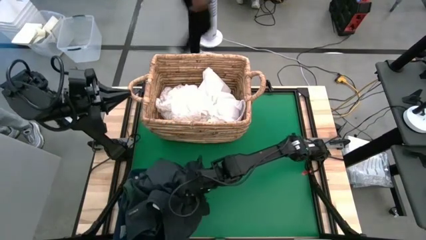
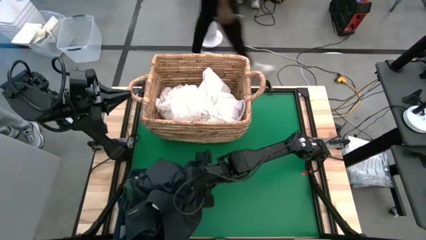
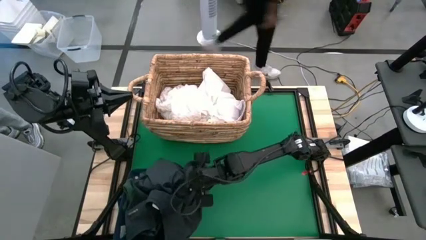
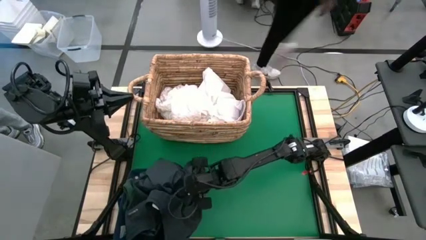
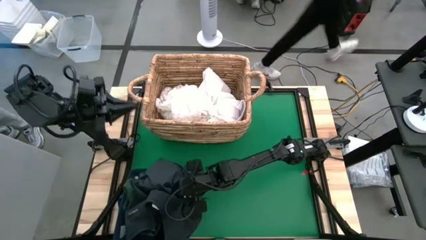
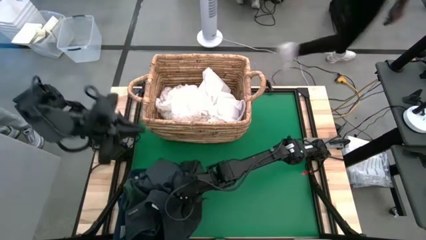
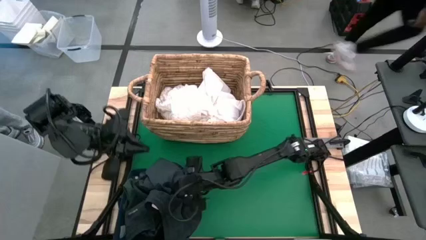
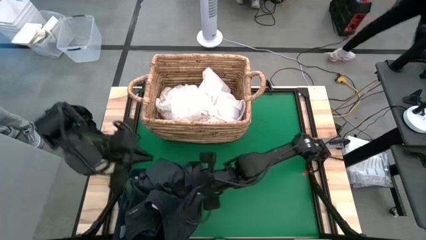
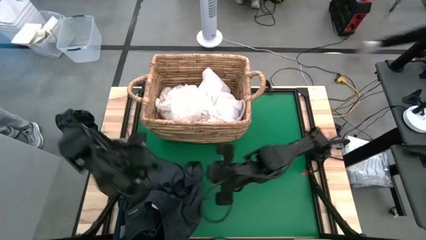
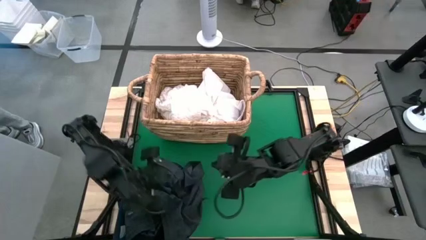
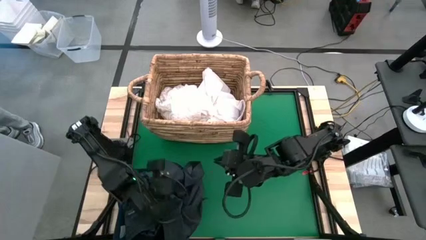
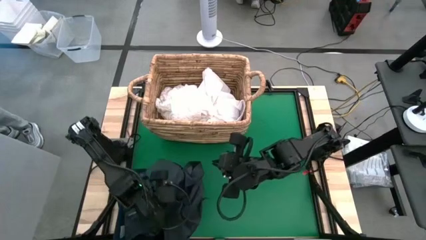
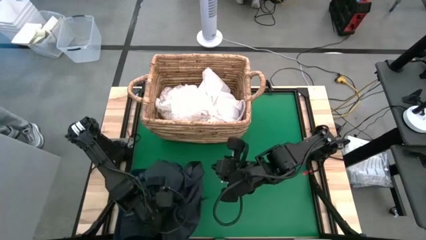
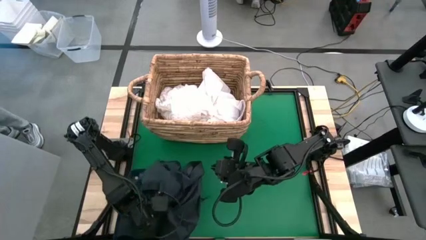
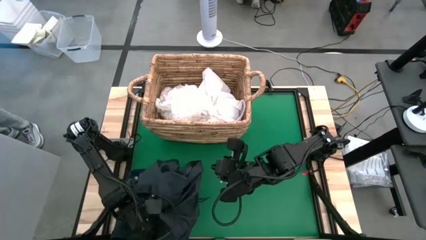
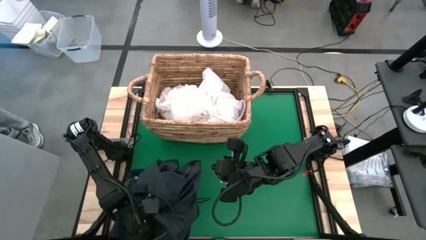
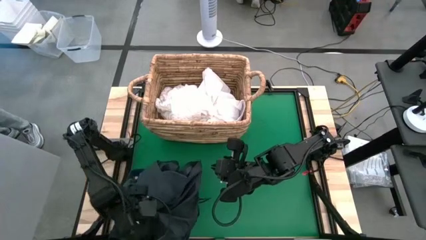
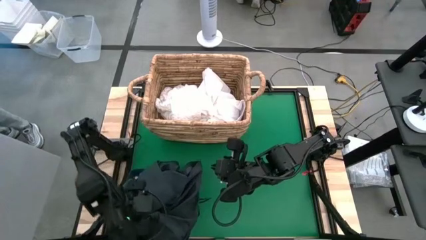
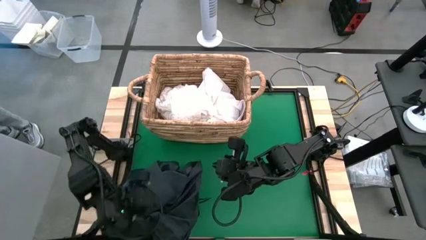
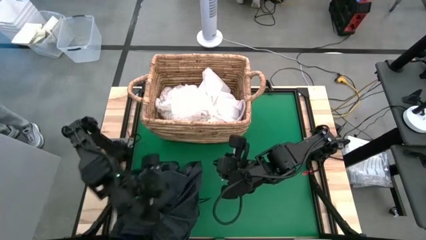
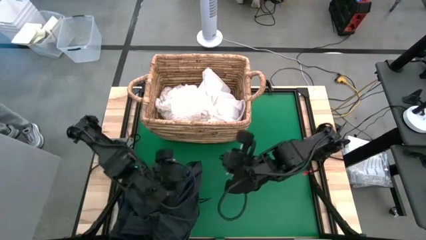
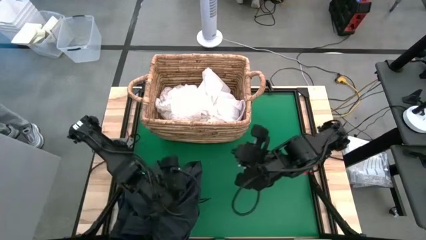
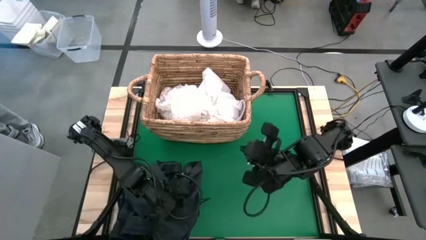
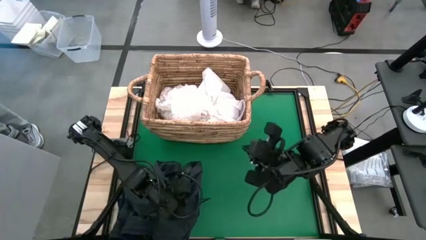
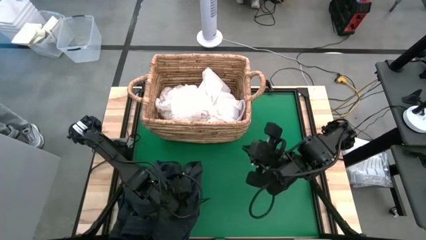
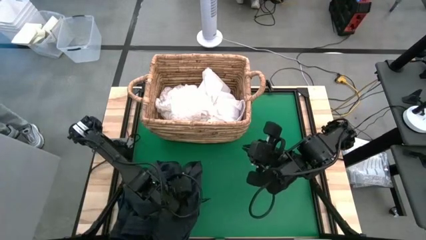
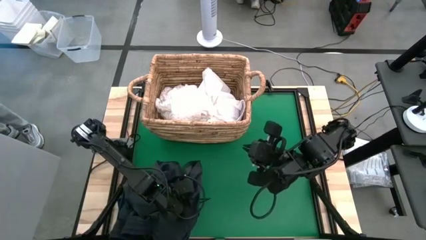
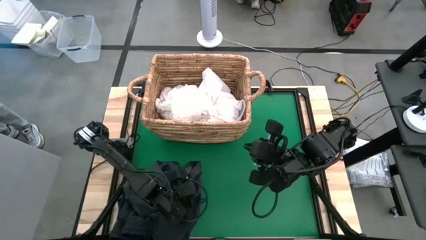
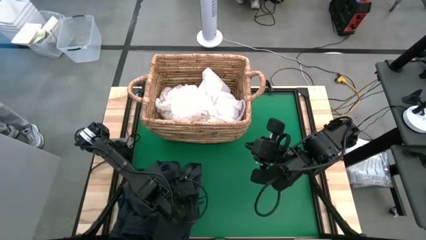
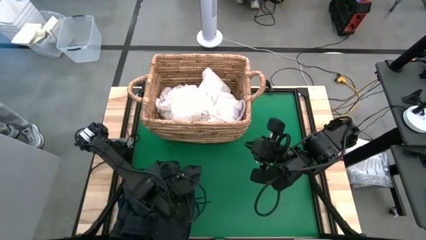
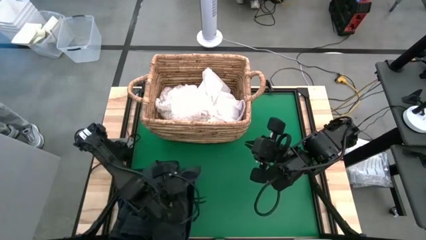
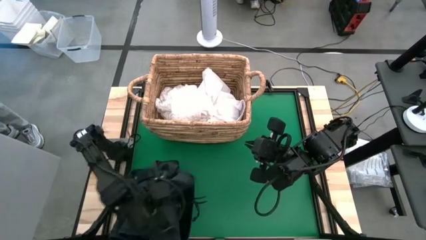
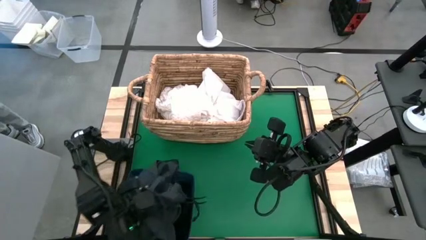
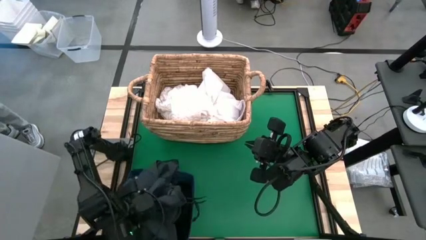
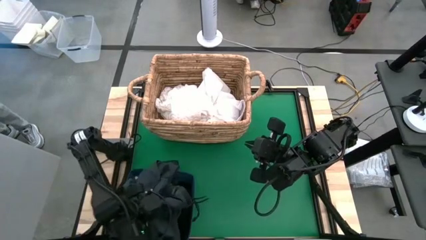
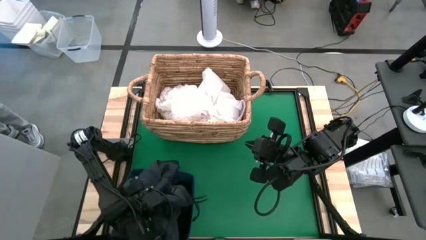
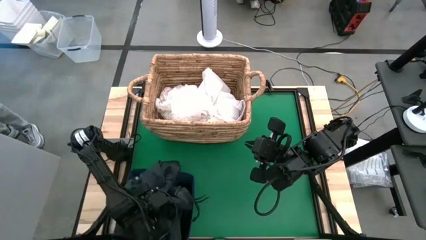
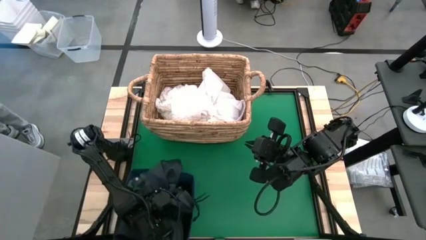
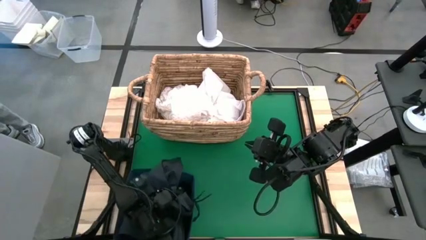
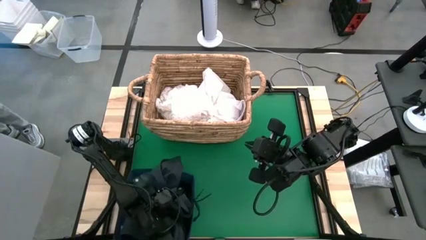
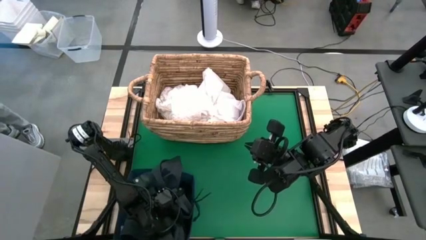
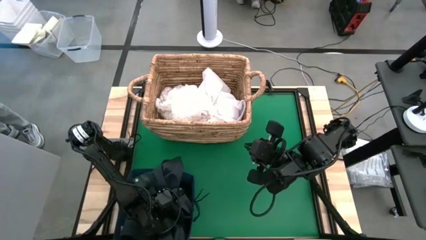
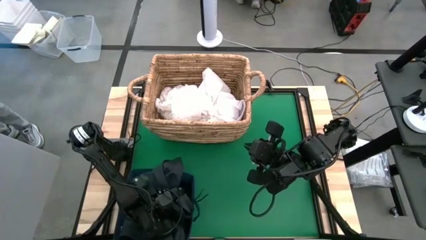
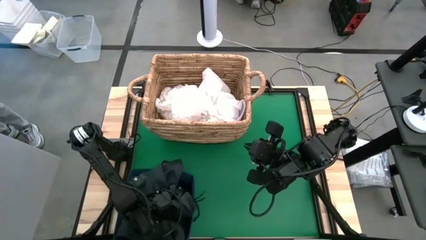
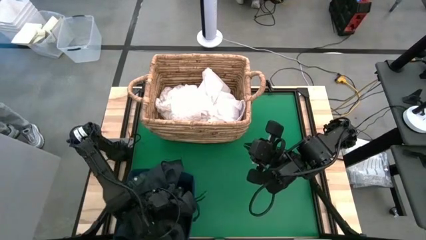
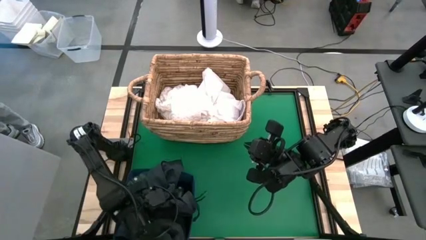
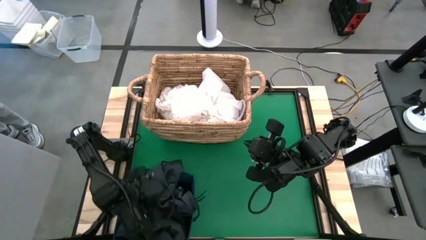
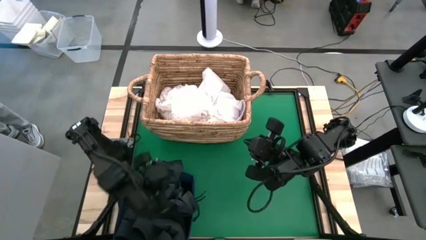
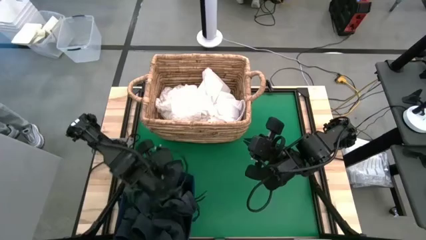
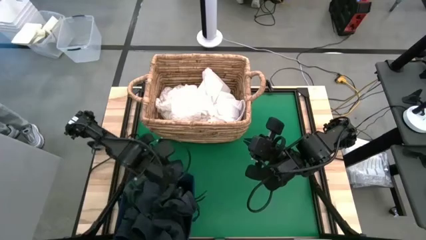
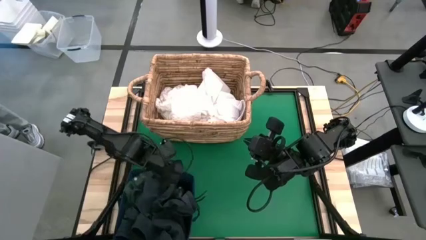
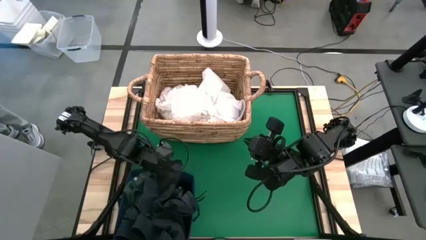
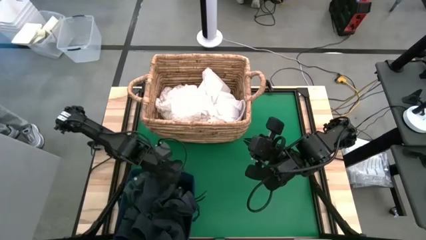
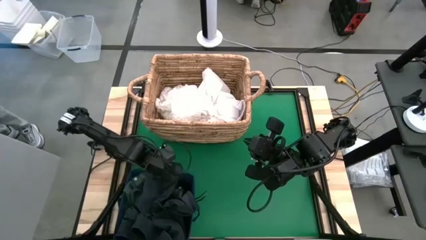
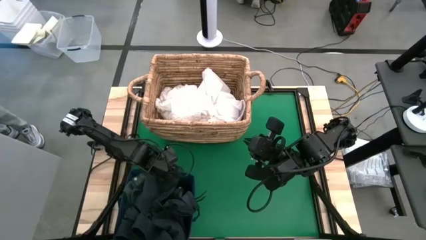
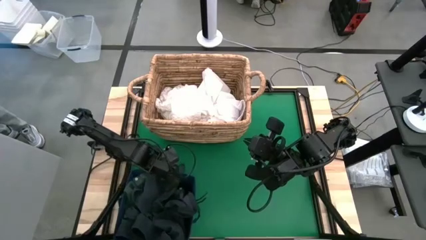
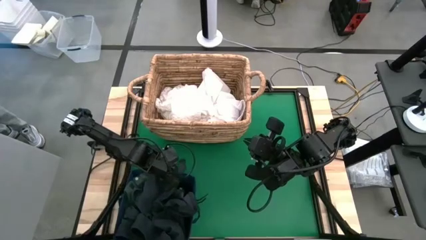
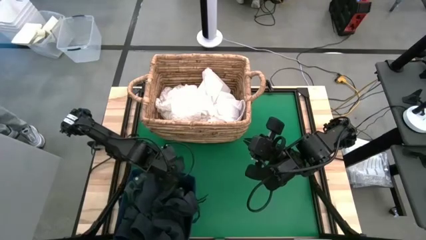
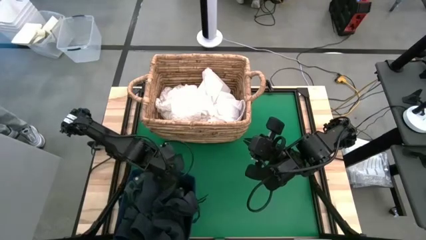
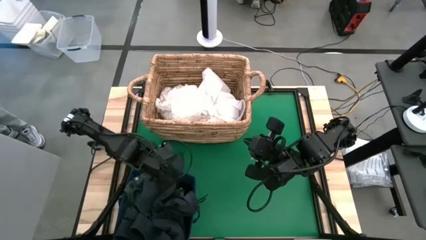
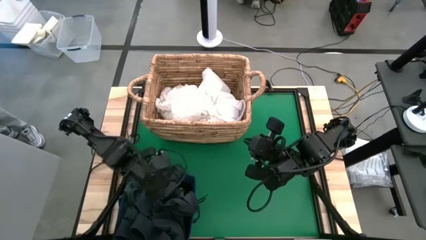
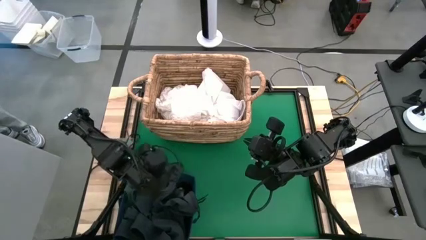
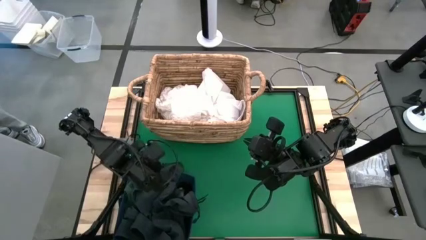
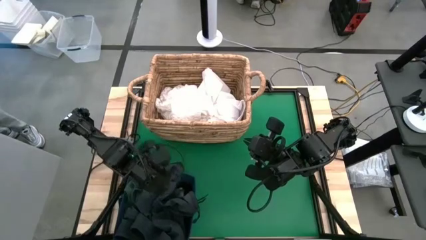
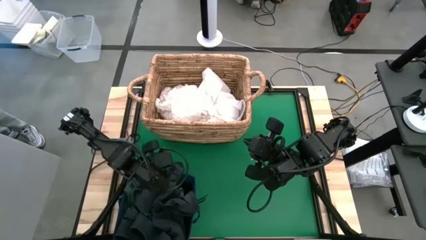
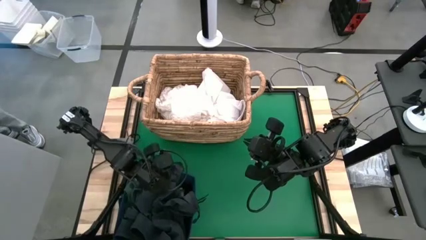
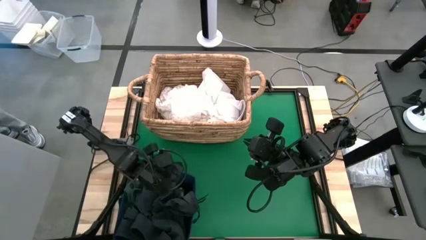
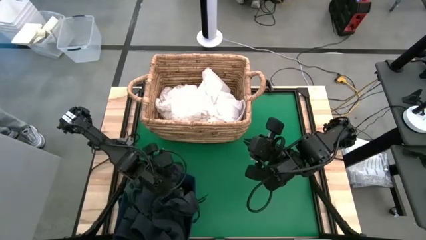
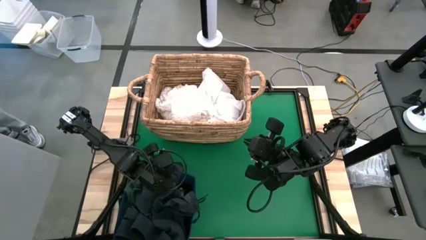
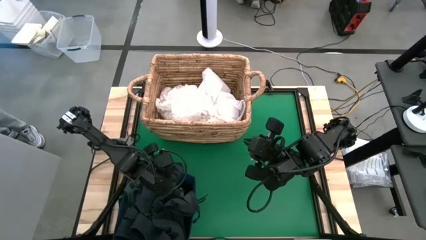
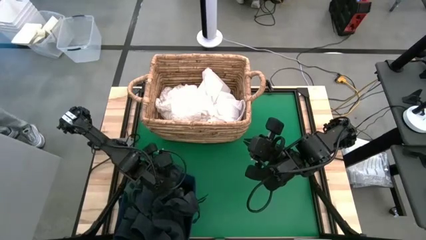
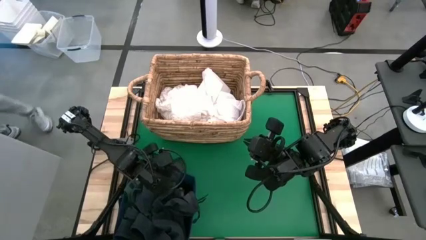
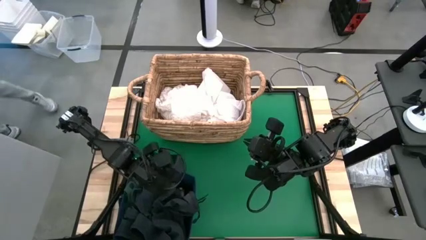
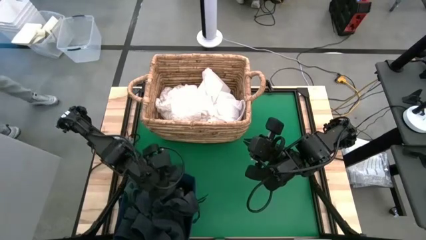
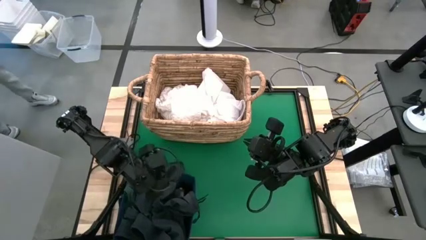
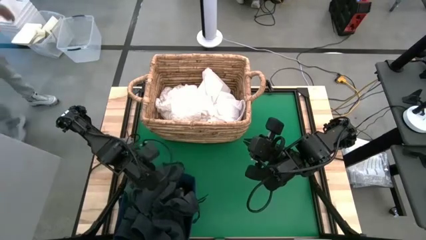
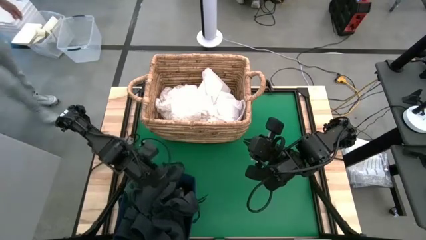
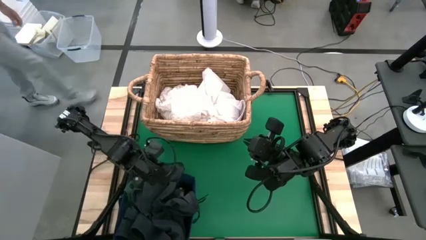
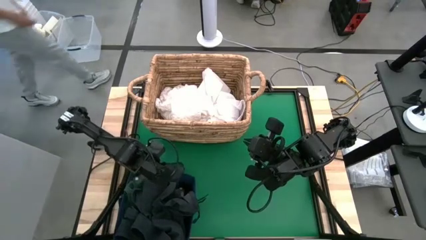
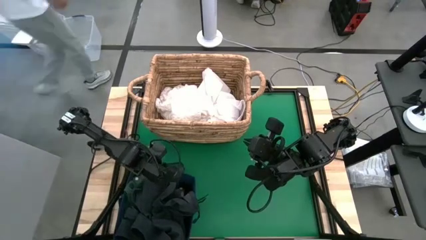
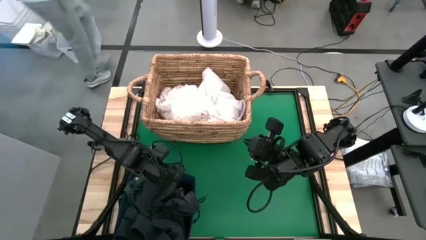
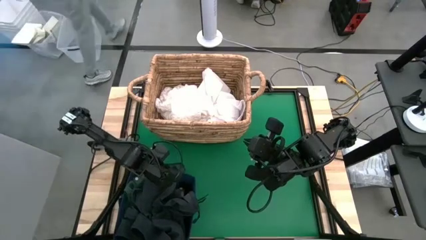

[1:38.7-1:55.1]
Put the black shorts into the laundry bin
